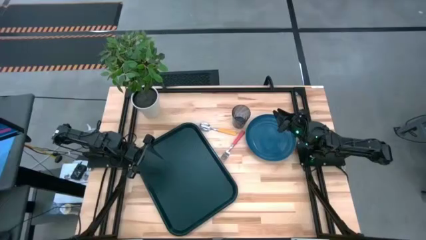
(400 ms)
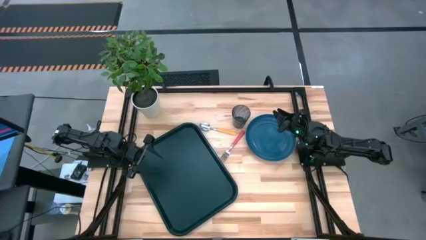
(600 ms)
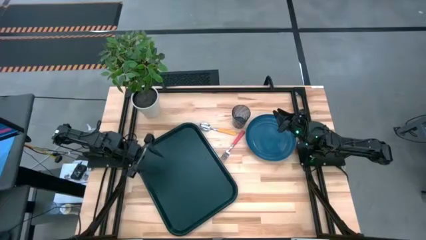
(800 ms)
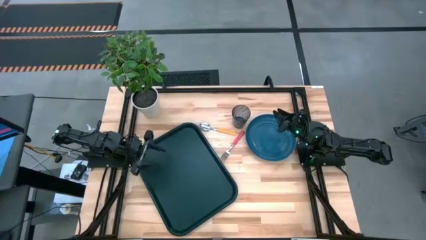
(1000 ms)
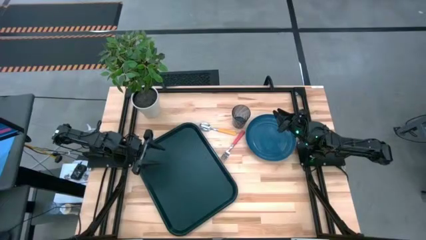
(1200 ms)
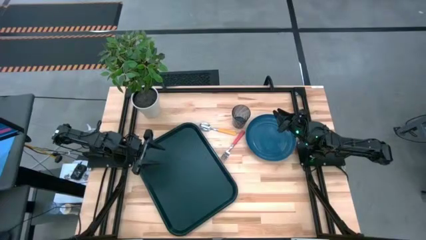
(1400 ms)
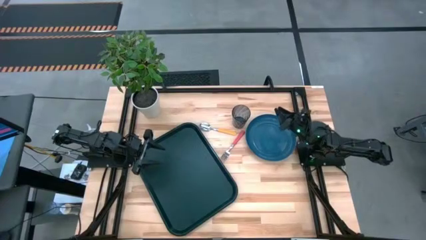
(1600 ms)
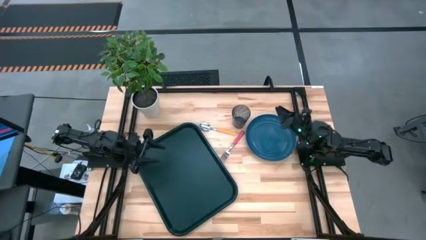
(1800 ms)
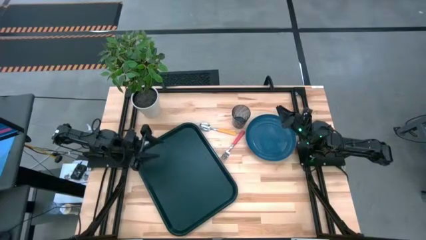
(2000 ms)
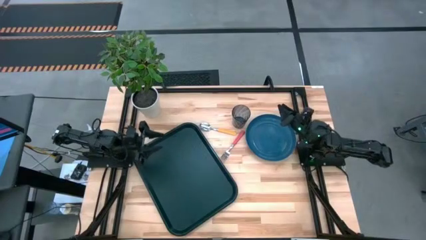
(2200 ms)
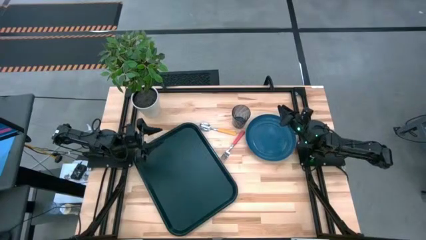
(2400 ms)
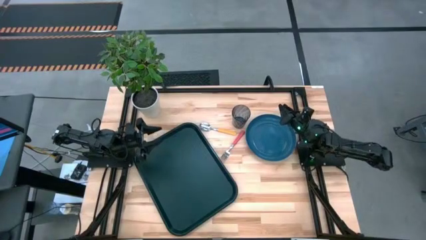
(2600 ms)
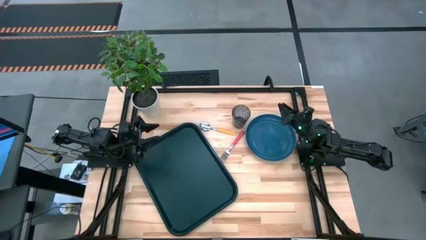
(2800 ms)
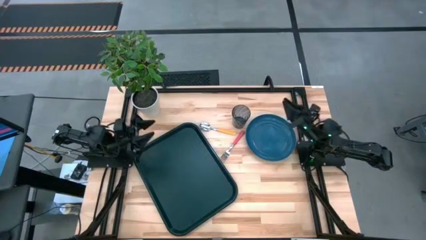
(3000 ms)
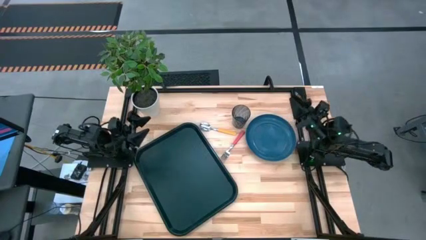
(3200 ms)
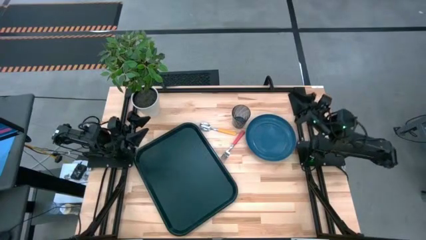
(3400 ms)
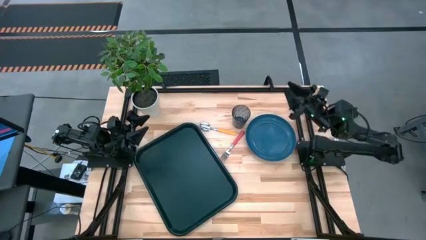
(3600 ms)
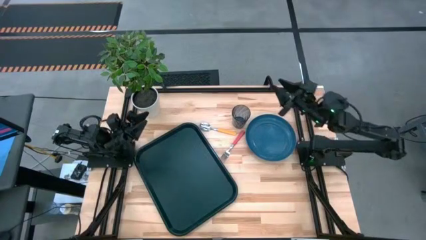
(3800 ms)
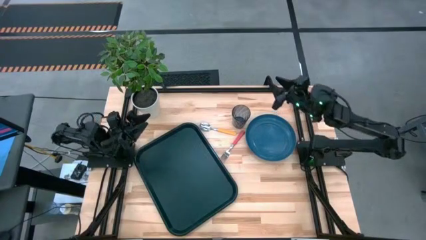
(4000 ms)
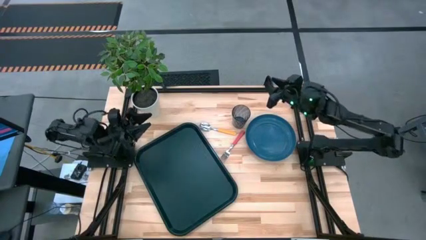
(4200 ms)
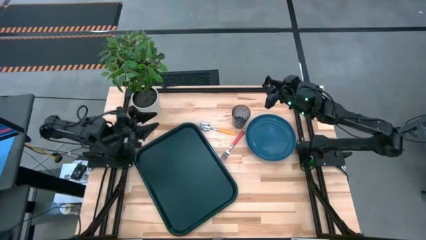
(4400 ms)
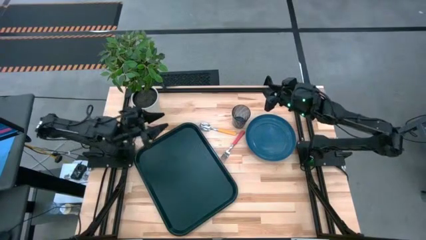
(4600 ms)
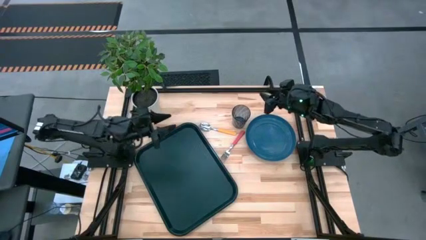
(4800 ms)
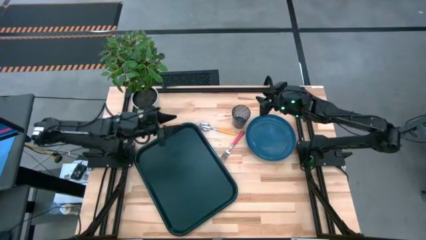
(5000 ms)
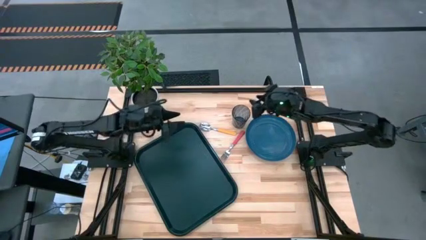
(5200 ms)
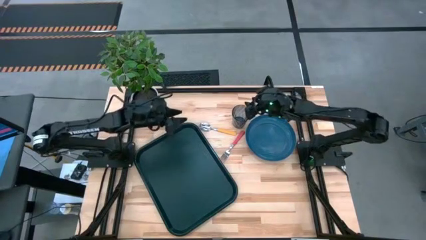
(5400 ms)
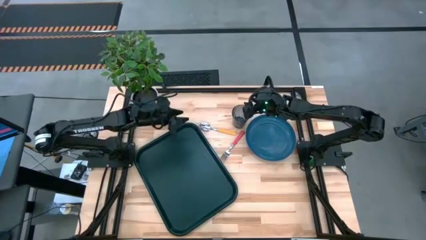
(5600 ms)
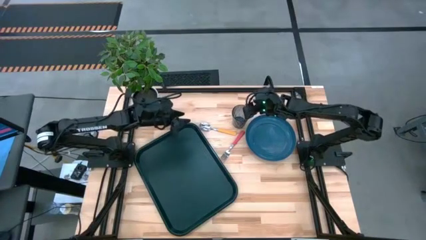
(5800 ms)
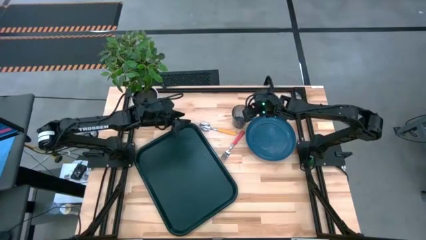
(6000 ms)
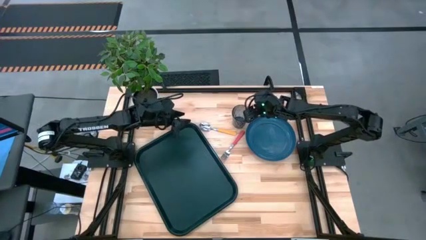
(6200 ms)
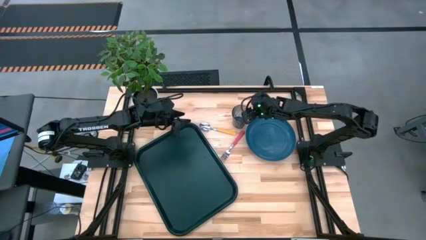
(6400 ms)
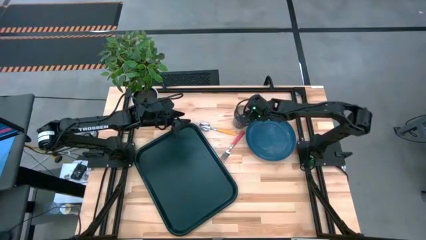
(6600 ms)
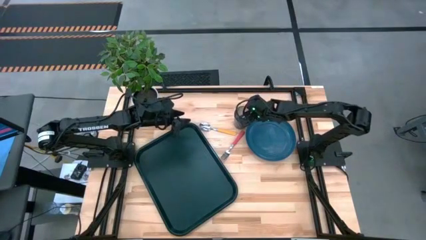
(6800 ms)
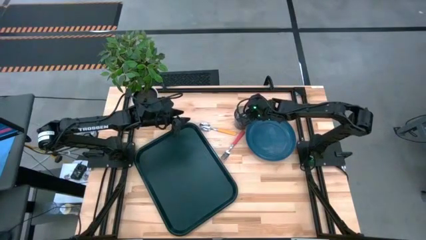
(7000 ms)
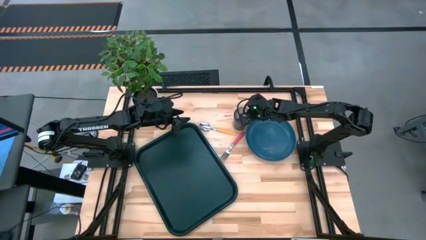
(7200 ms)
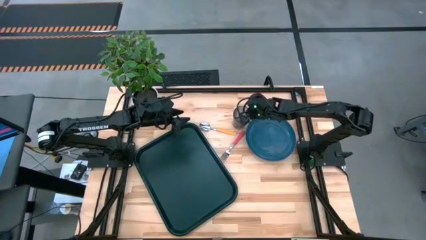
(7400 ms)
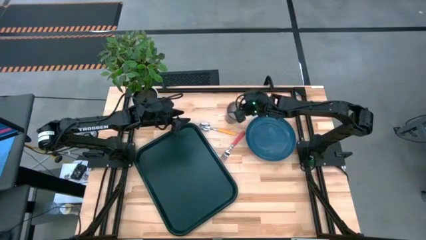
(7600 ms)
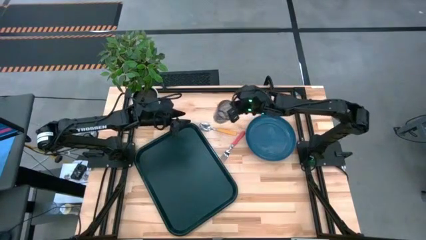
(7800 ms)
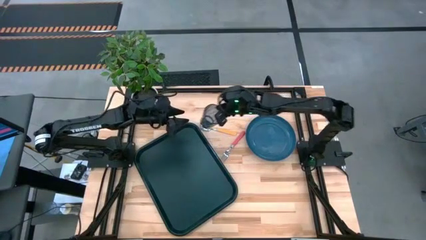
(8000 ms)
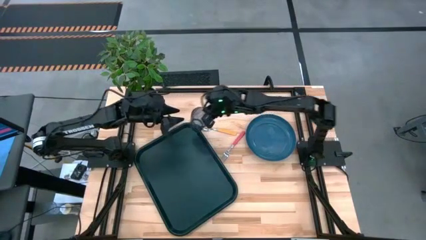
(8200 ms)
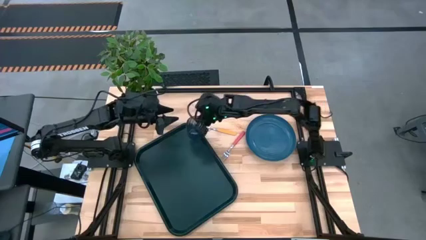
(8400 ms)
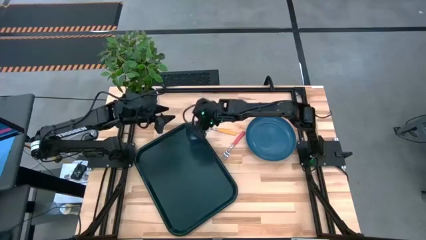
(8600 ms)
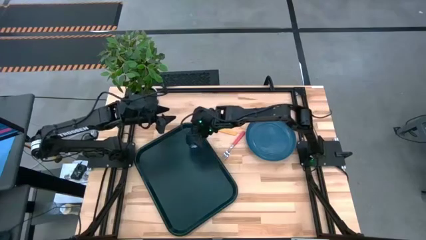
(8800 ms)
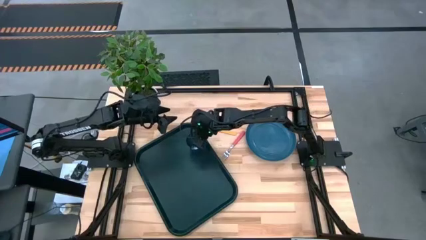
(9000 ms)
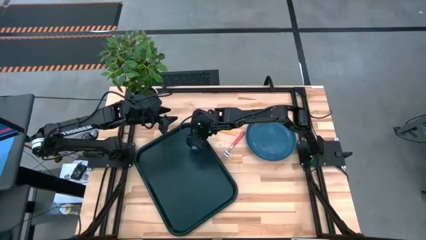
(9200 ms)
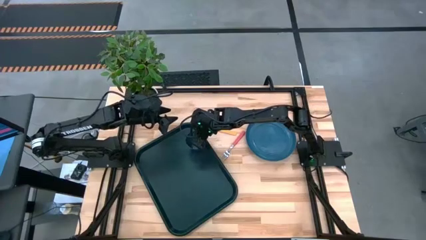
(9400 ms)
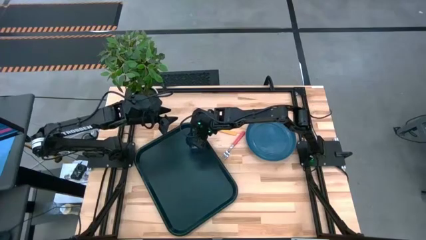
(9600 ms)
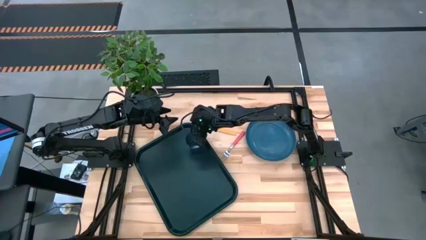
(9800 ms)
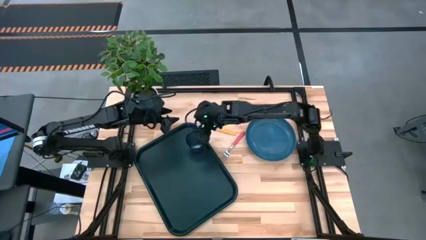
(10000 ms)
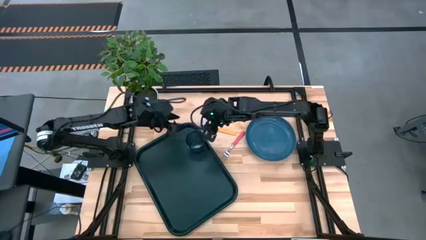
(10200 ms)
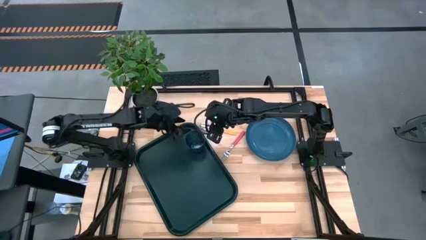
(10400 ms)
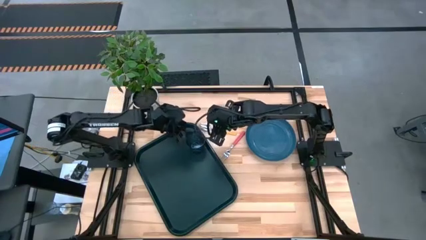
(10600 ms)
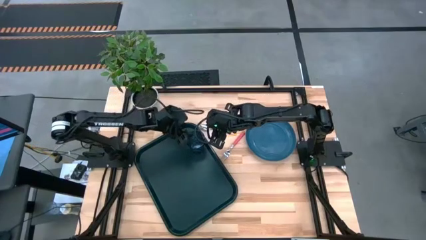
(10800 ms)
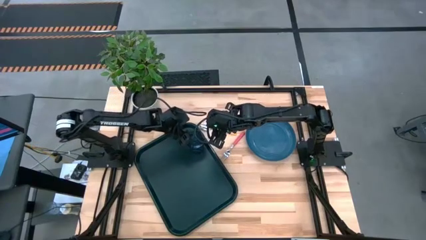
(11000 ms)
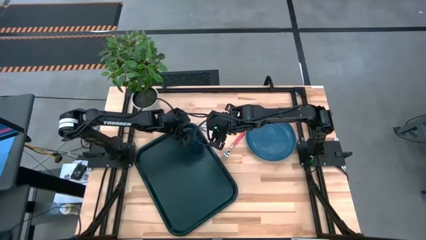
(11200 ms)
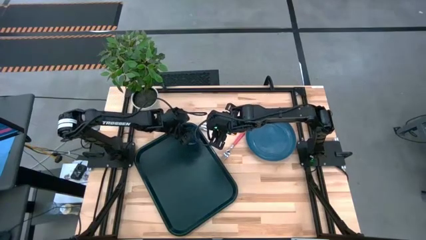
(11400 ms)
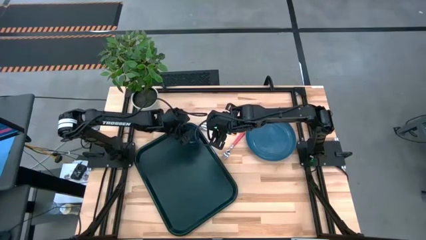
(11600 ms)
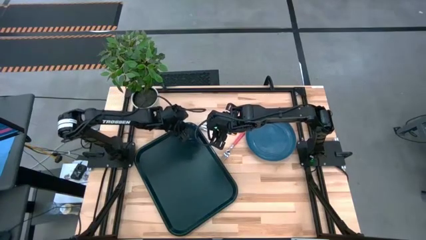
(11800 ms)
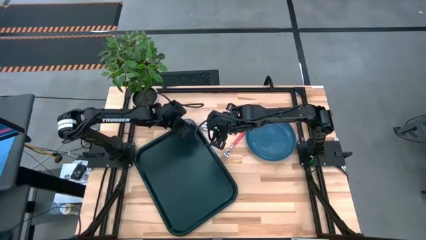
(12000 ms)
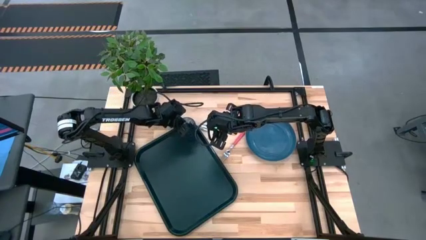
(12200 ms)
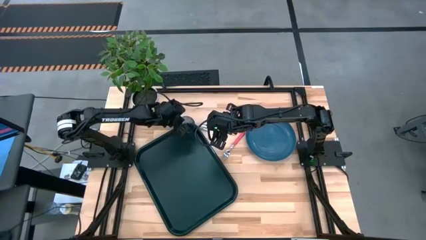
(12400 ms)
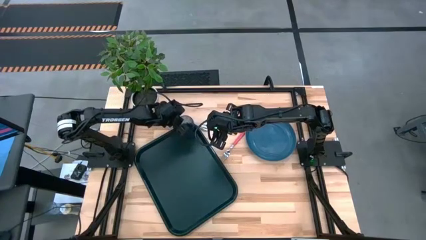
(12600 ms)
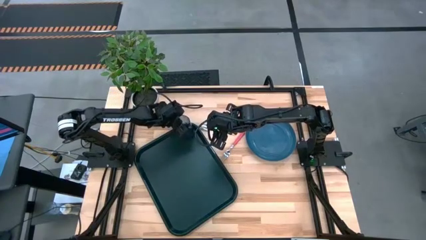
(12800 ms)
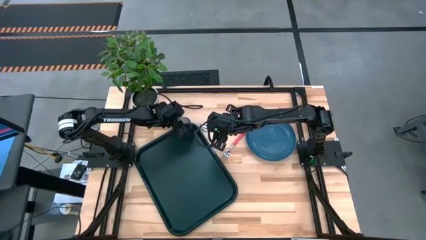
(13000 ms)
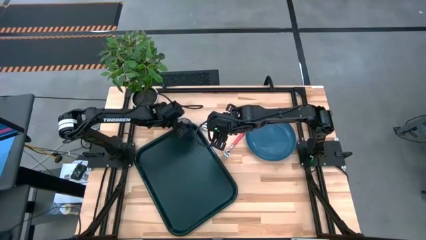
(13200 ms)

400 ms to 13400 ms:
Task: Pick and place plate/cup/fork/spoon on tray
Put the blue cup on the black tray
